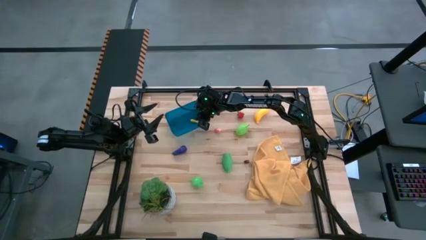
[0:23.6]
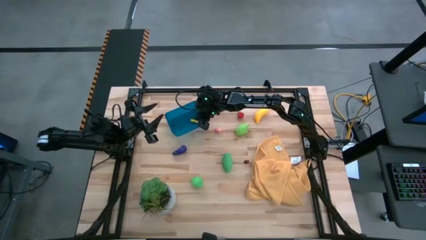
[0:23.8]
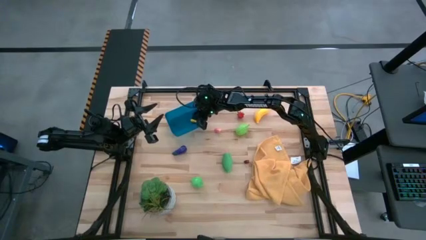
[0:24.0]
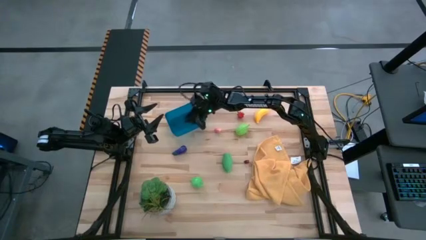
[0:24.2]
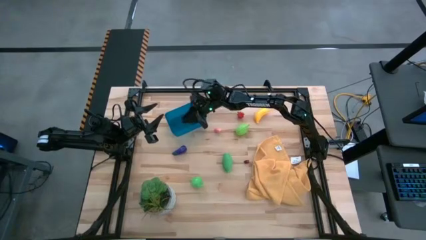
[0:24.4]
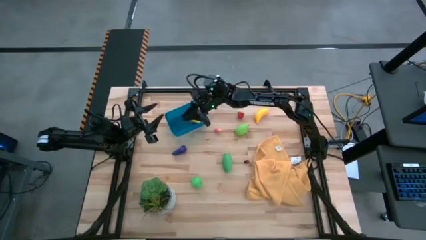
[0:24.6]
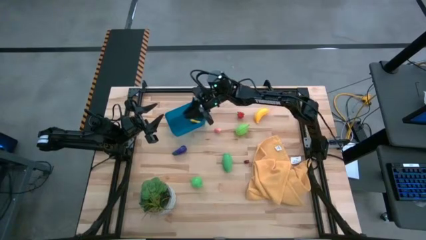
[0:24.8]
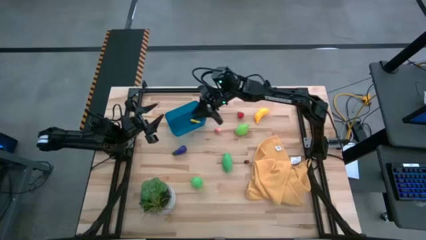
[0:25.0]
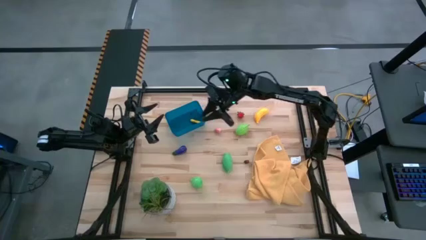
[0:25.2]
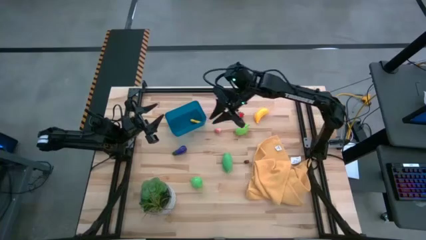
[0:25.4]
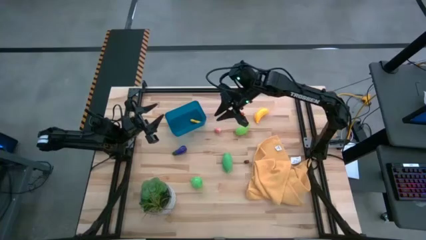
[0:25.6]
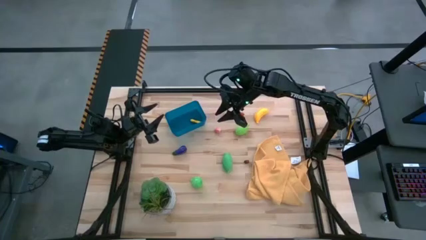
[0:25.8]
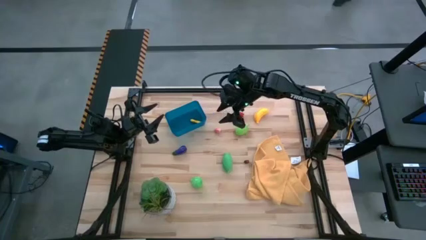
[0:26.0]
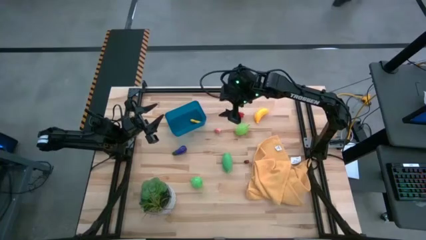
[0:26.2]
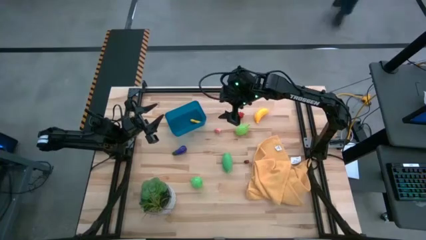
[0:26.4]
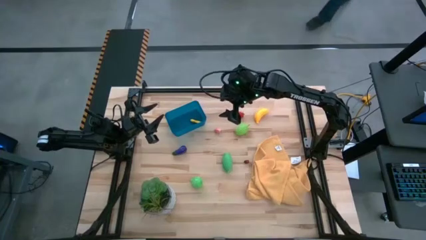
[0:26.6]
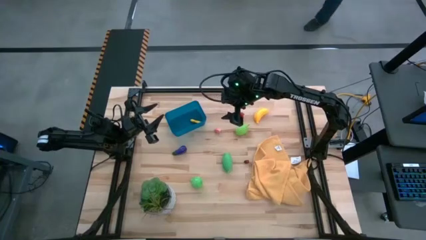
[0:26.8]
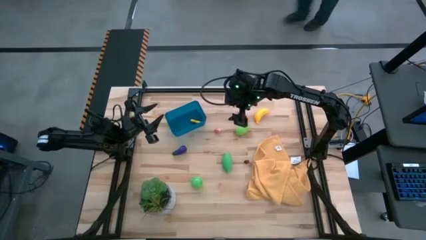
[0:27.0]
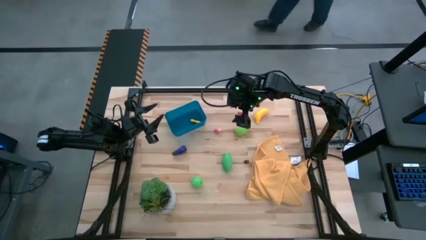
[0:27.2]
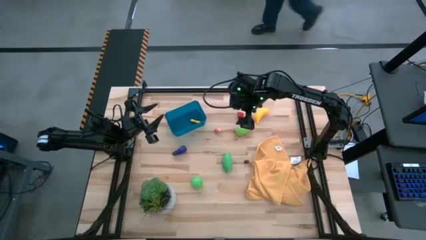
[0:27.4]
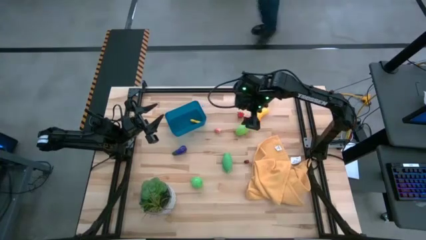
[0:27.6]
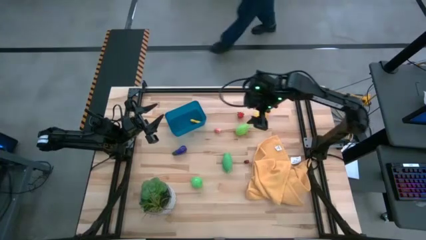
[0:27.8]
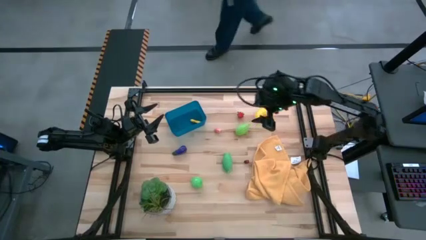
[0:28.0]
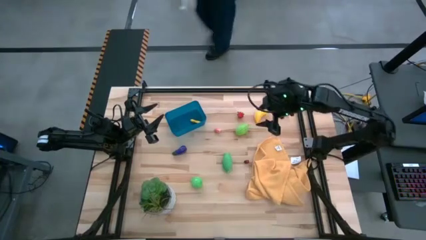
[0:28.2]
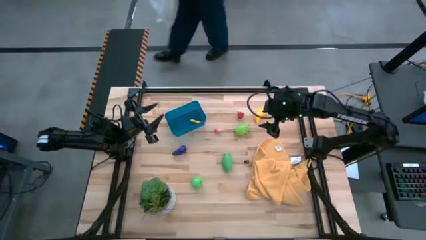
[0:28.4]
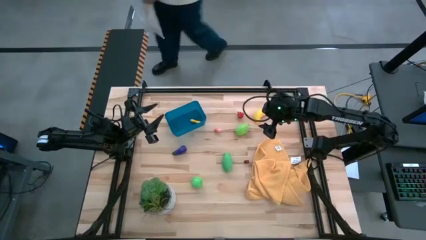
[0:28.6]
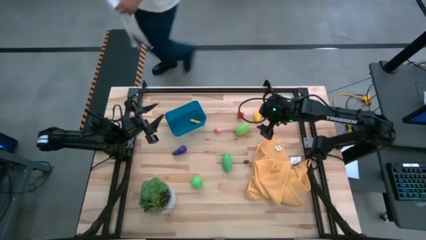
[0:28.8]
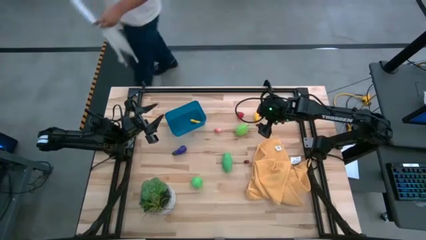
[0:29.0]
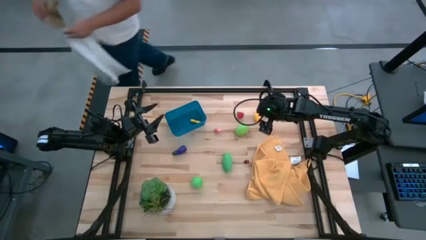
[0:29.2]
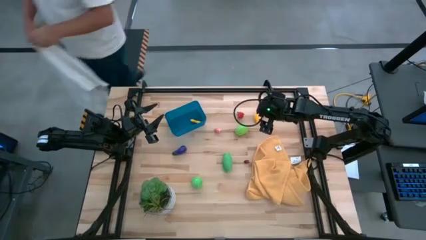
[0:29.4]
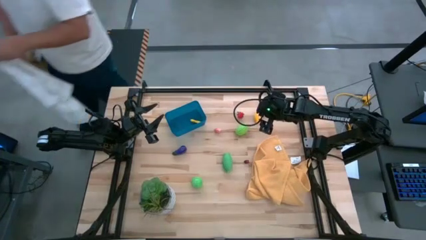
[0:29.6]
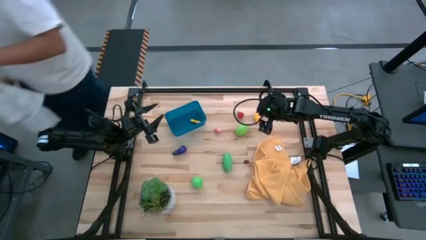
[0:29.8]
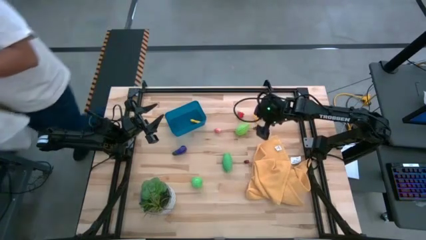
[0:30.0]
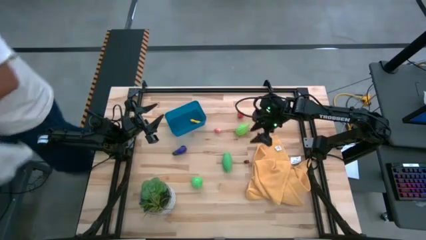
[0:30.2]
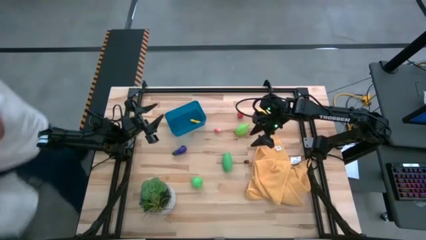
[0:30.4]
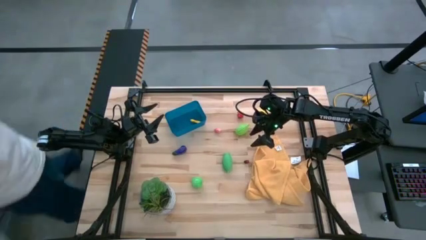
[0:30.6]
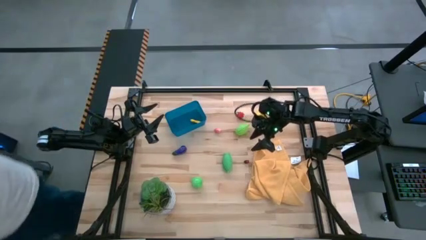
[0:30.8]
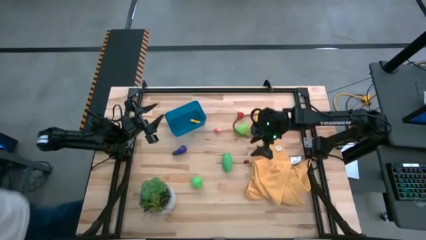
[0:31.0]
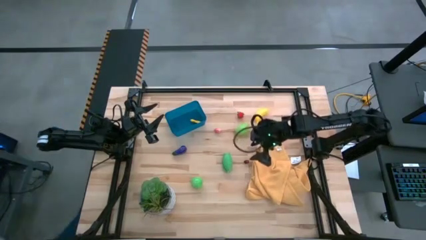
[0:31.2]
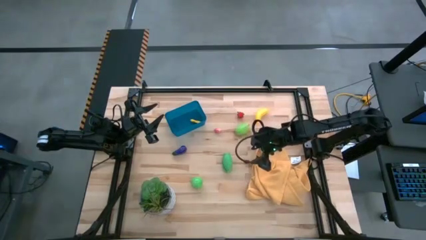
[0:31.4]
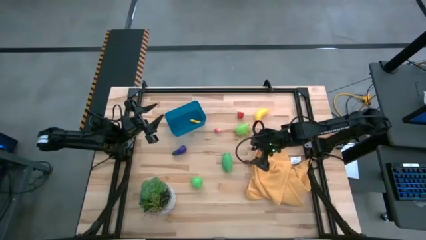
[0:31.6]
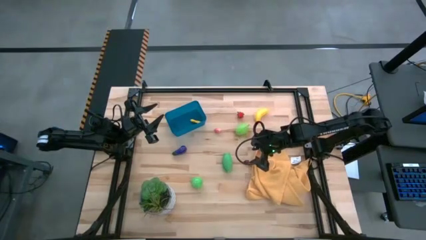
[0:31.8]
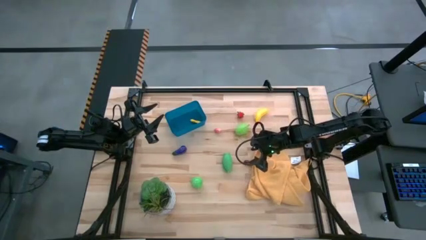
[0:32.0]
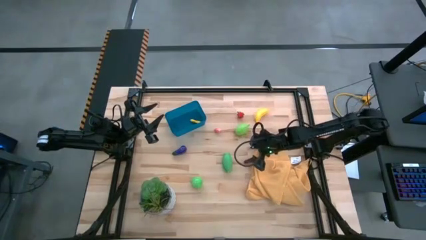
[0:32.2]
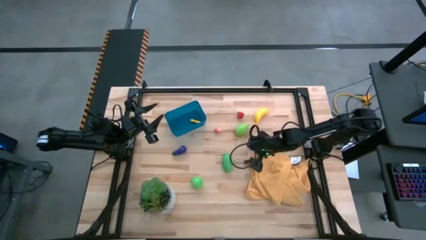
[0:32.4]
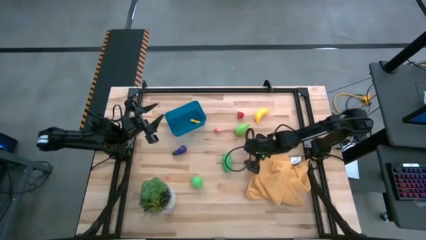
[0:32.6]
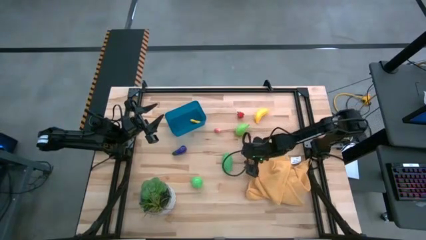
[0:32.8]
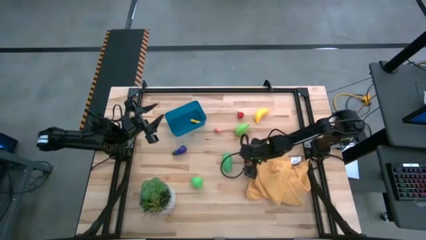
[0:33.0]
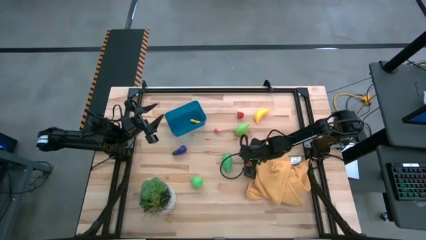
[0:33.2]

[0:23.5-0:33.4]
Task: Pick and placing Produce into tupperware
Put the cherry into the blue bin

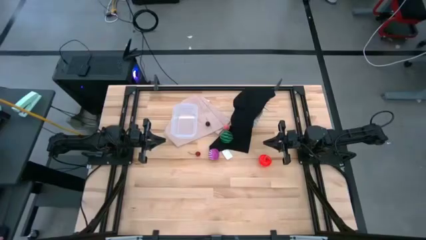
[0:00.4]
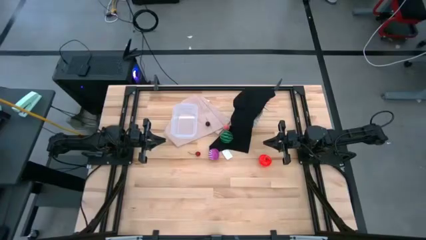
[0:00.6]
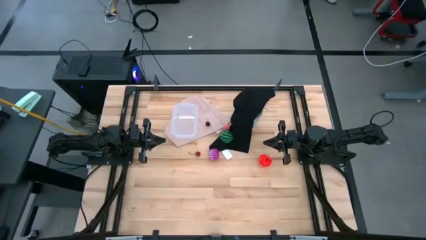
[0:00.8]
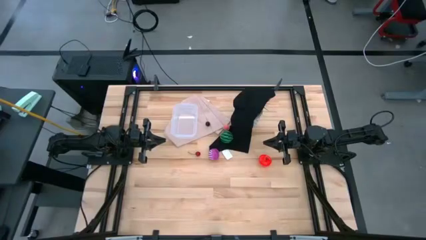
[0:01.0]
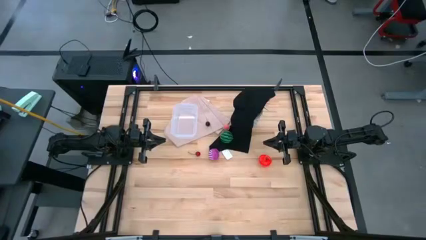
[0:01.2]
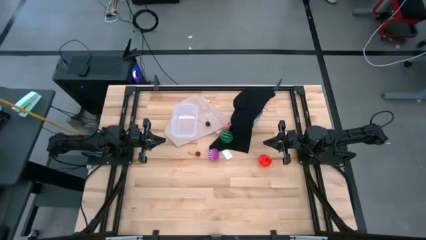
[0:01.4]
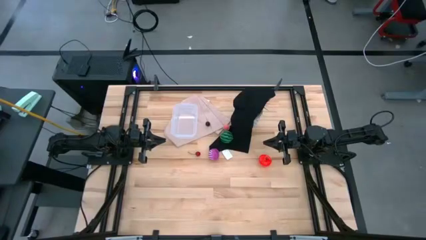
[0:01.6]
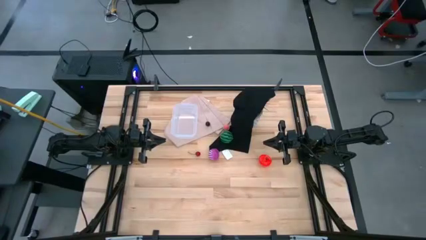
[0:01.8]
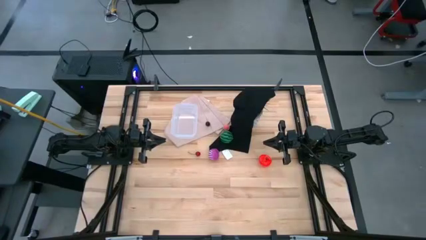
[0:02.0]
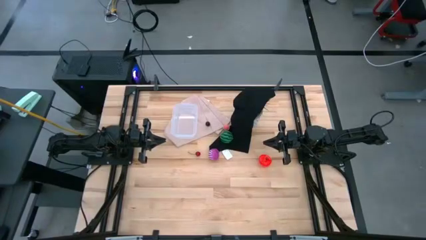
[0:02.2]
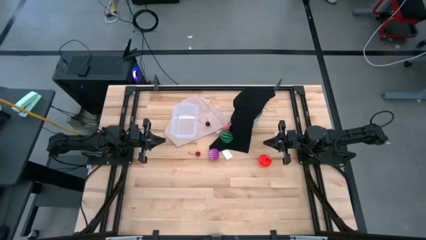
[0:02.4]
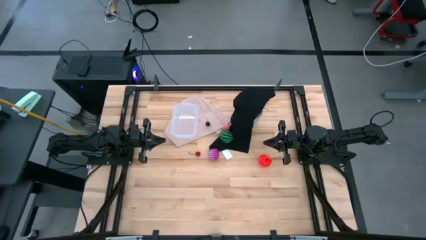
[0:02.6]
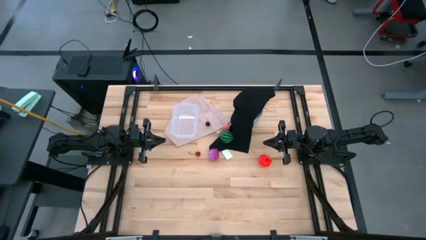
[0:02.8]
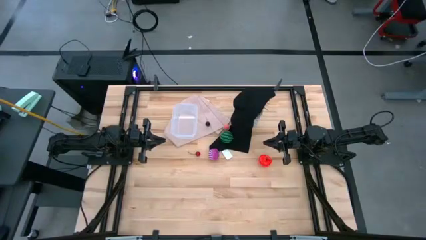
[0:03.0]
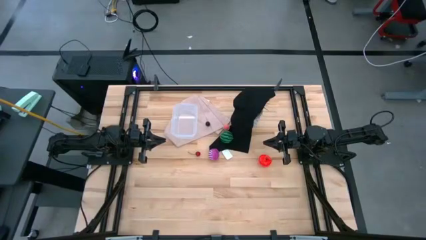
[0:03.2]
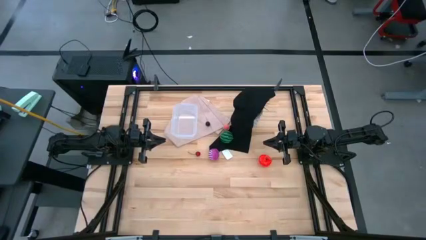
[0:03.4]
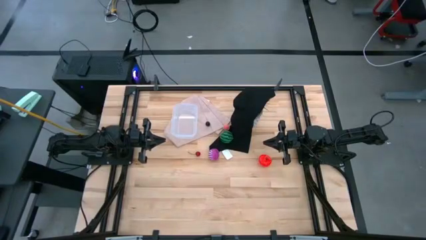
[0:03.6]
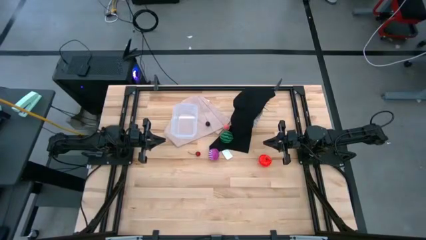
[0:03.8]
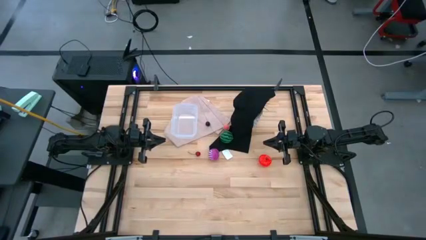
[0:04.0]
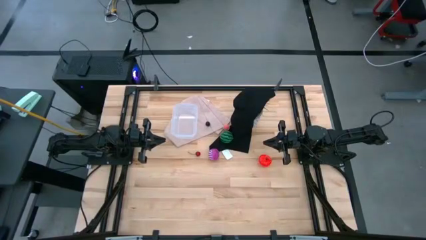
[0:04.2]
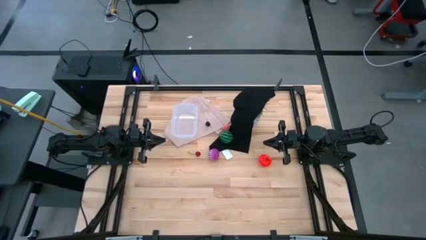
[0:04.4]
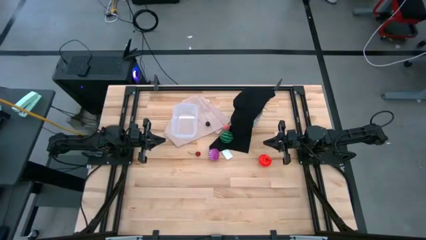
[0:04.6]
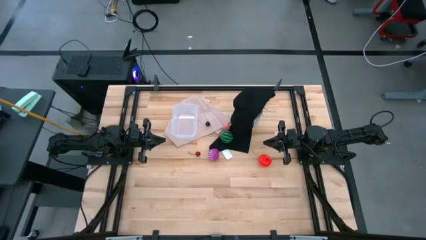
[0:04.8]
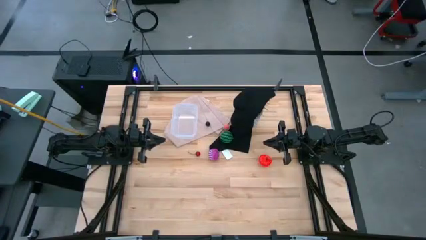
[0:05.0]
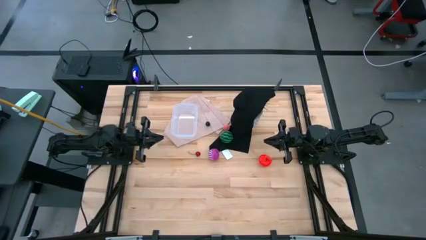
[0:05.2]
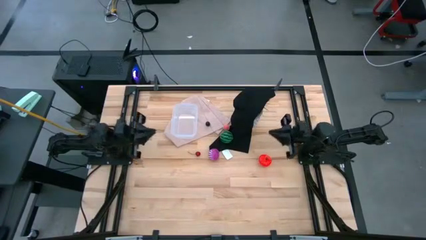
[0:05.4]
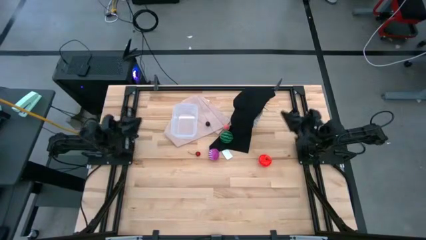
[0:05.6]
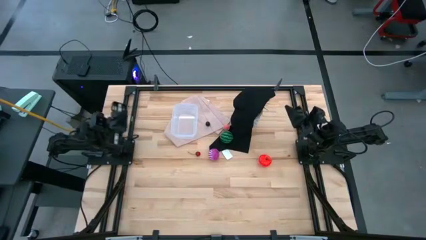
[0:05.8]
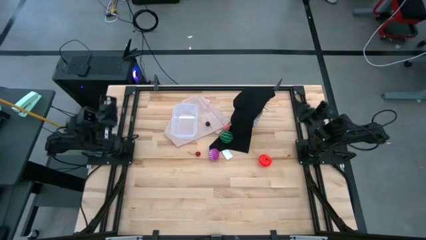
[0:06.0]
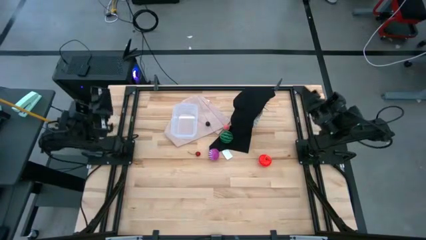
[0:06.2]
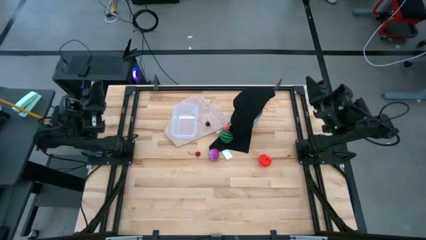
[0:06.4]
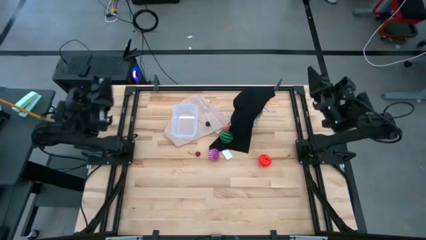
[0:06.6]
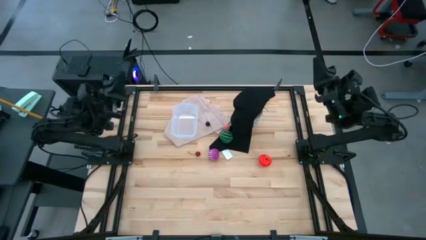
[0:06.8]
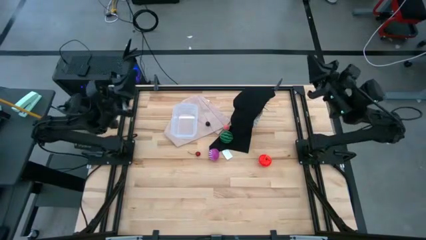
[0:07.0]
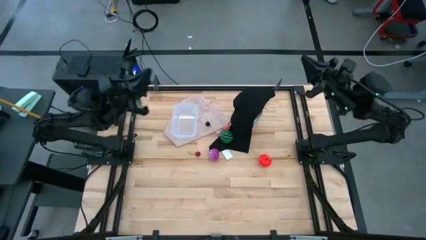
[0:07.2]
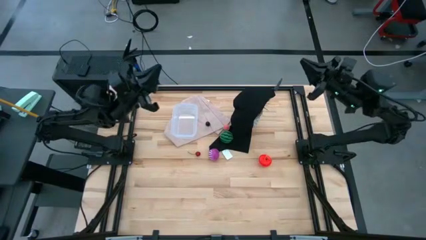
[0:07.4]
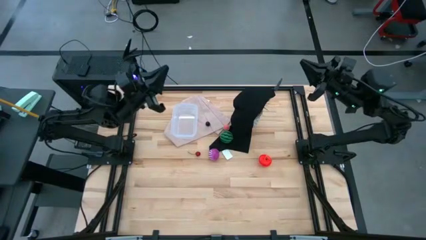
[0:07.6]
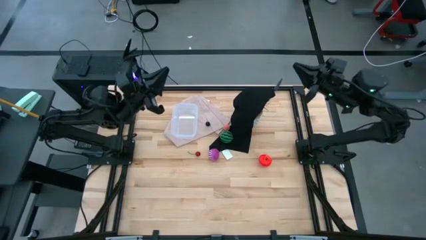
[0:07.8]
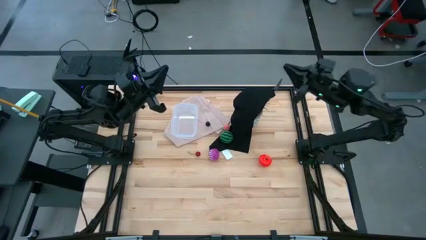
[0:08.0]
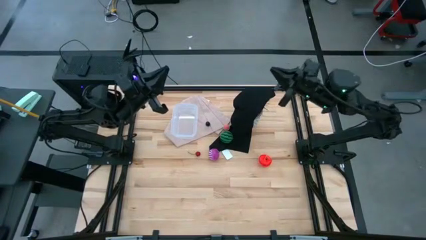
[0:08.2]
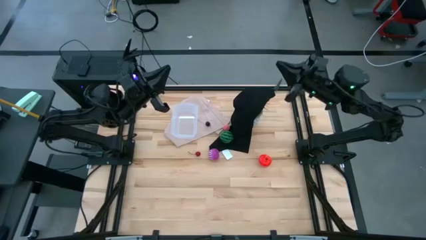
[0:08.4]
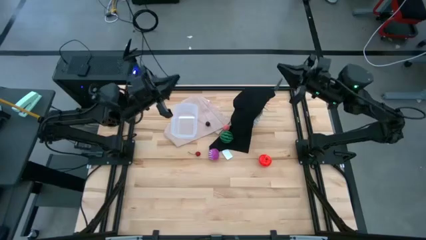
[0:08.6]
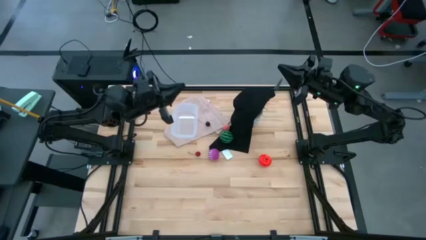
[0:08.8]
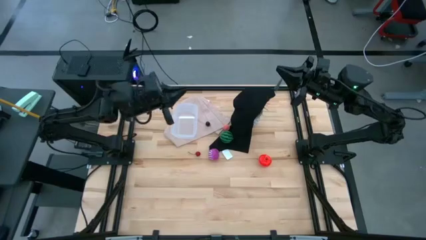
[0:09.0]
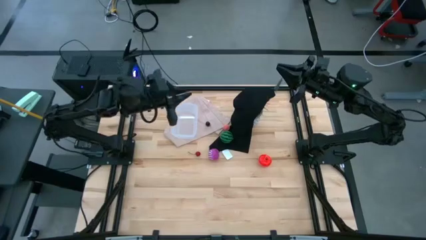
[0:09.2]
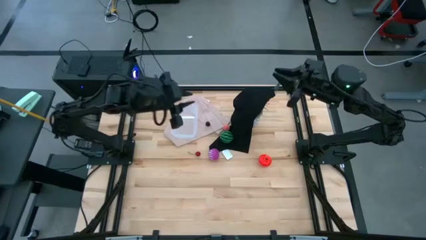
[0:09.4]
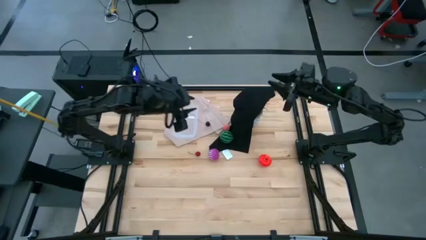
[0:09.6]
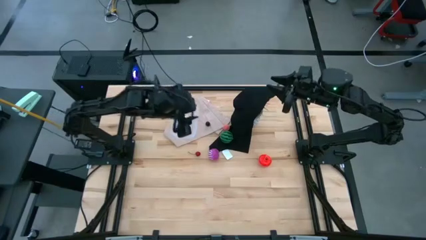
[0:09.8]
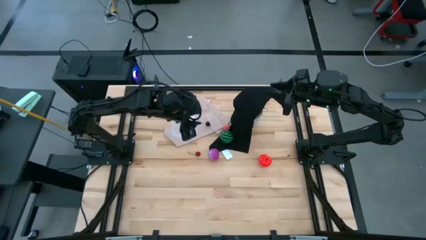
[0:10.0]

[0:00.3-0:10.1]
Task: Pick and placing Produce into tupperware
Put the red apple into the transparent bin
